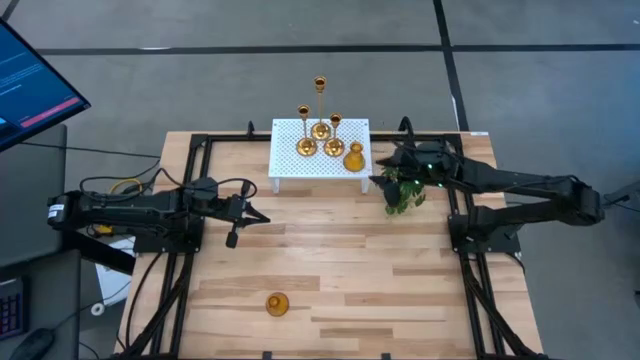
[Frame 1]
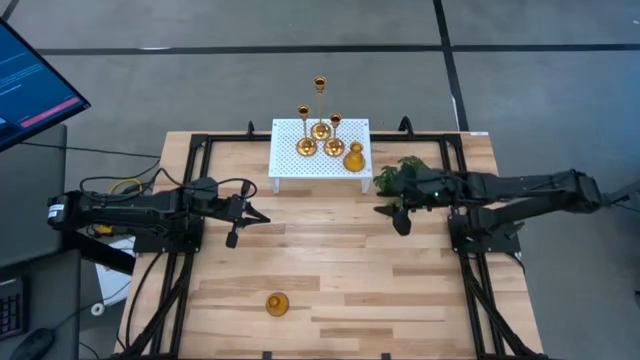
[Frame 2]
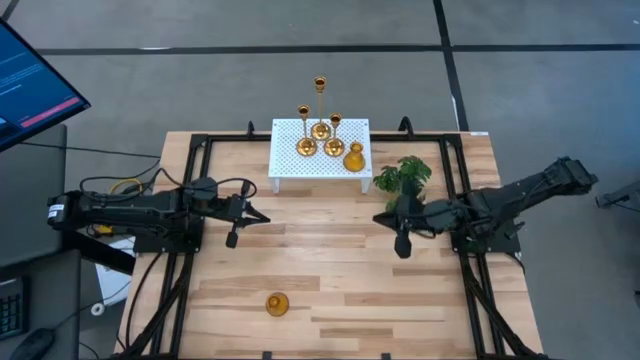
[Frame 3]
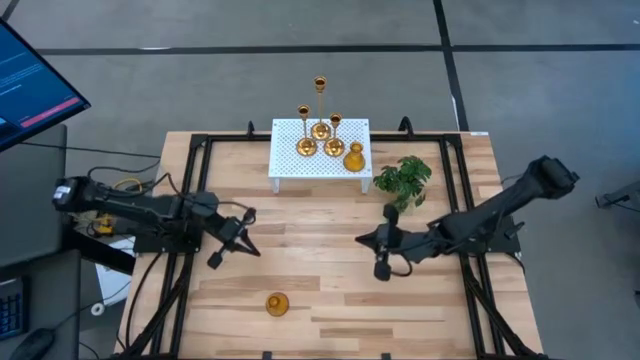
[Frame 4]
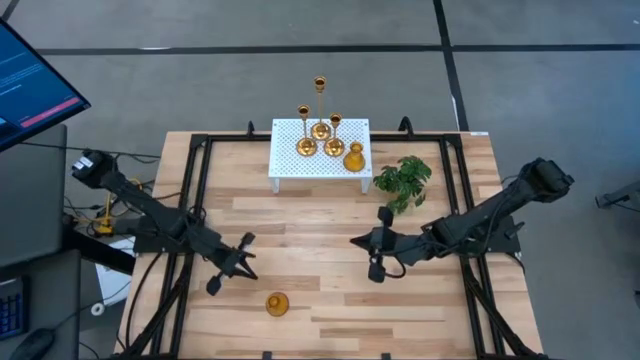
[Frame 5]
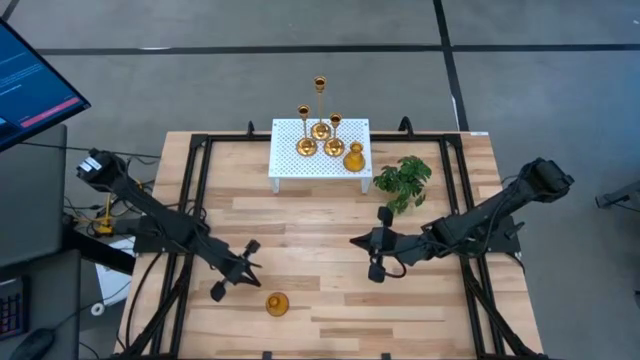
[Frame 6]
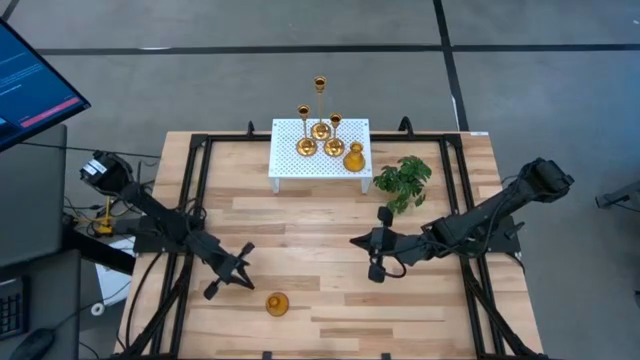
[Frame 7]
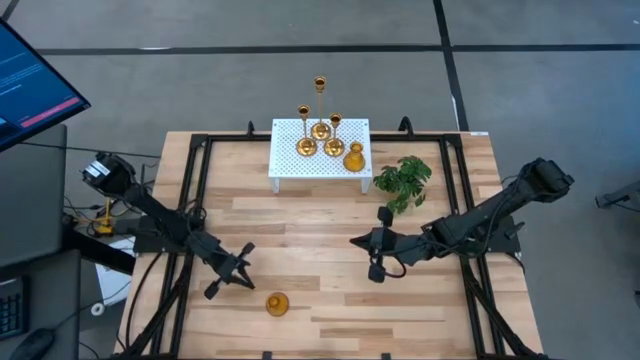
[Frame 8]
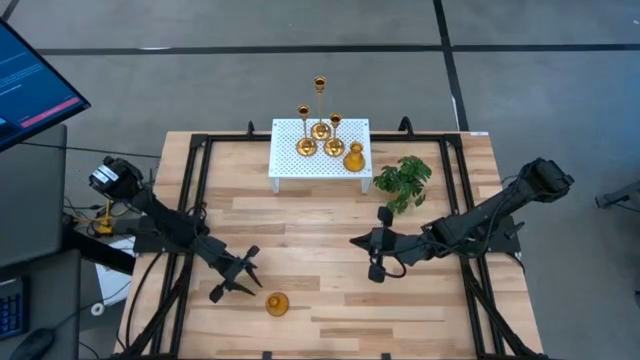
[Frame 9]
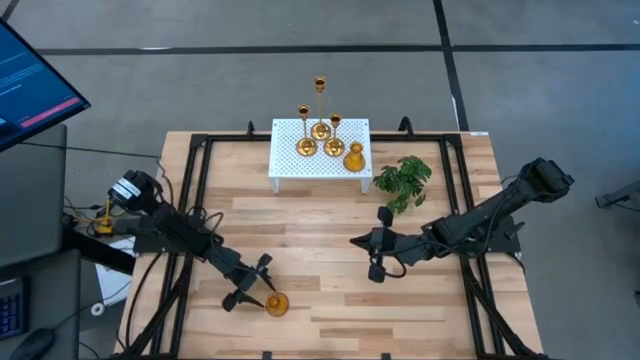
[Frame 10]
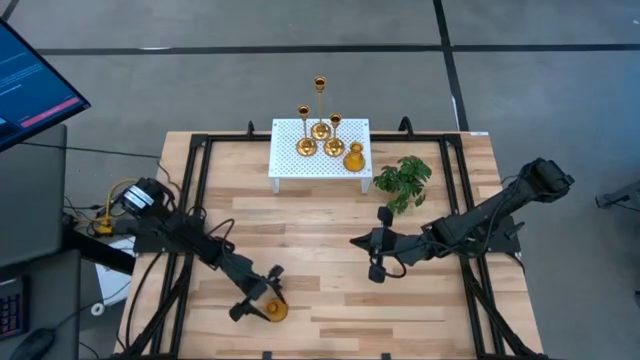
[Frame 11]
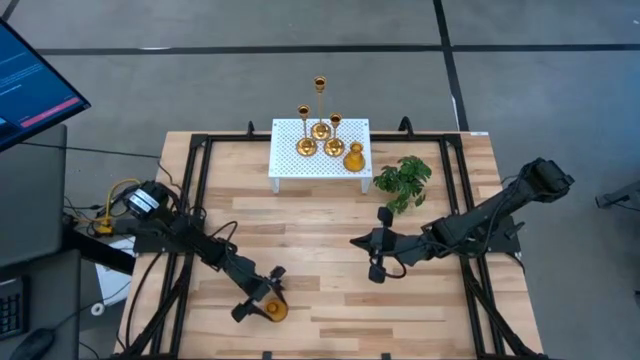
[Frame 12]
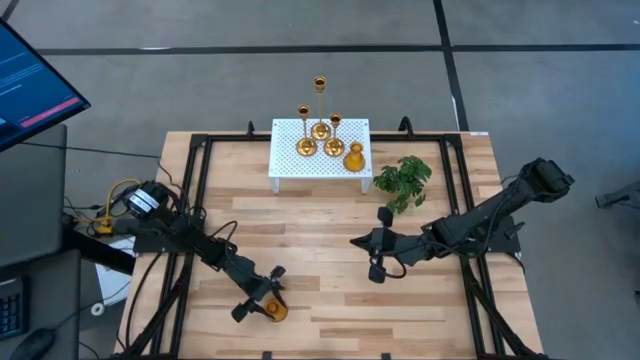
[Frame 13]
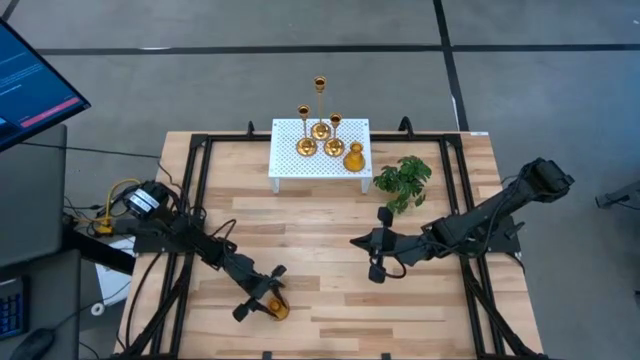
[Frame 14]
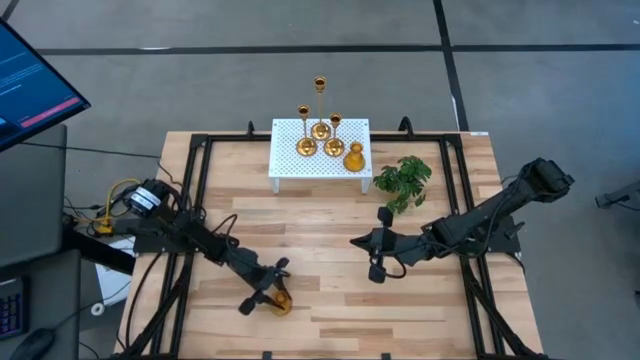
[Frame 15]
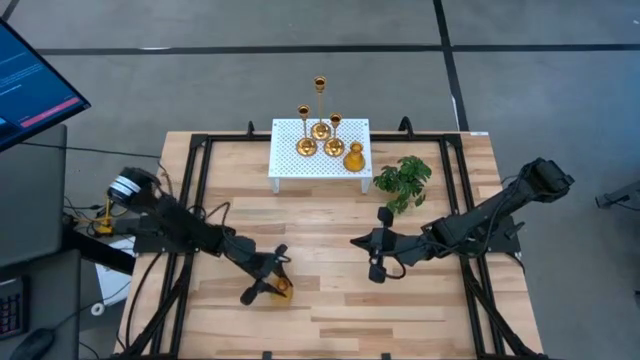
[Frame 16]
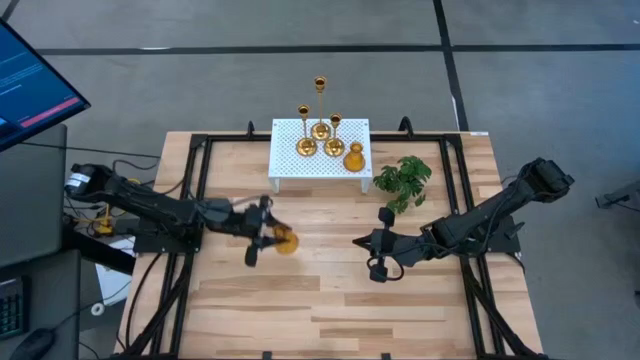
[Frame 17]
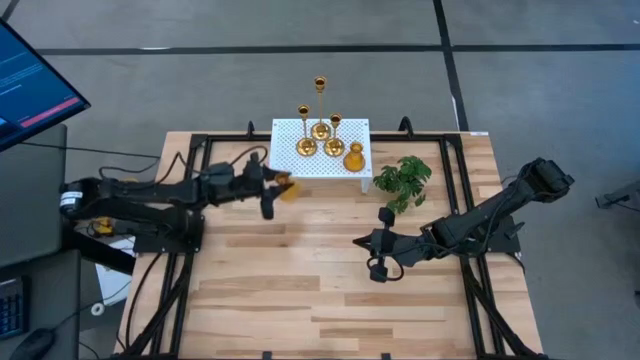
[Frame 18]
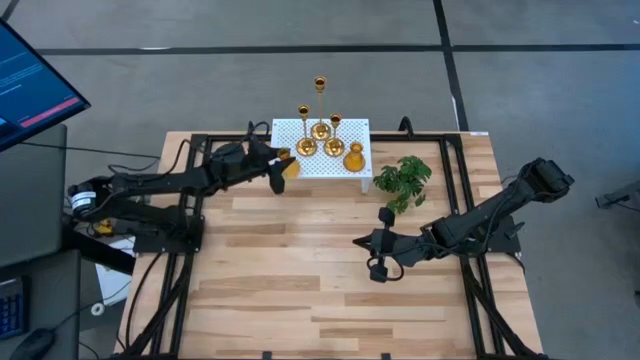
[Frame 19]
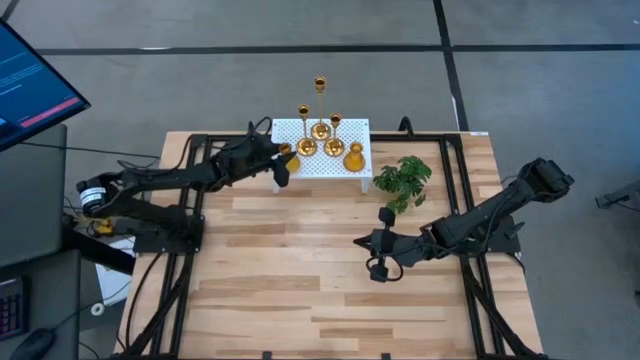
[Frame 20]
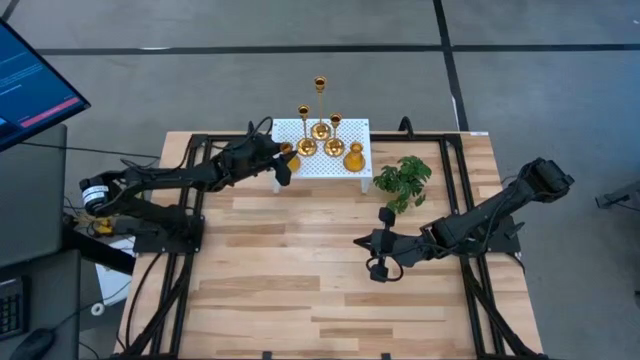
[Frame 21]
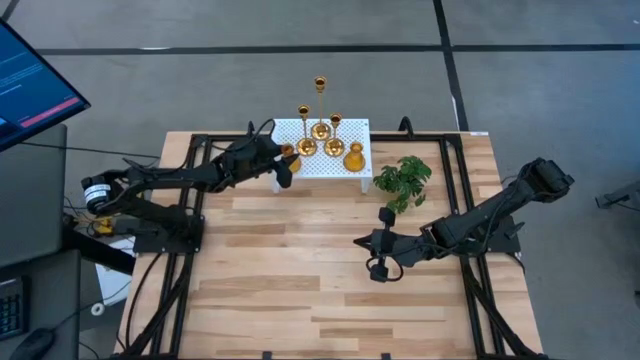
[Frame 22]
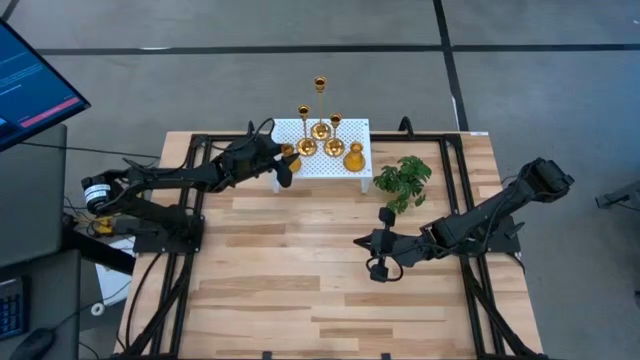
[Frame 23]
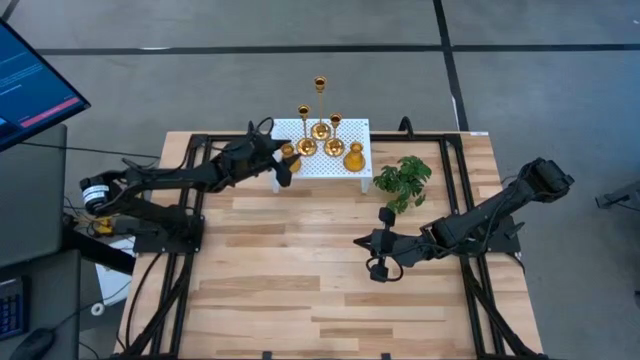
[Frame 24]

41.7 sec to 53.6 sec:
Task: Pick & Place candle stick holders
Put the yellow candle holder on the shelf

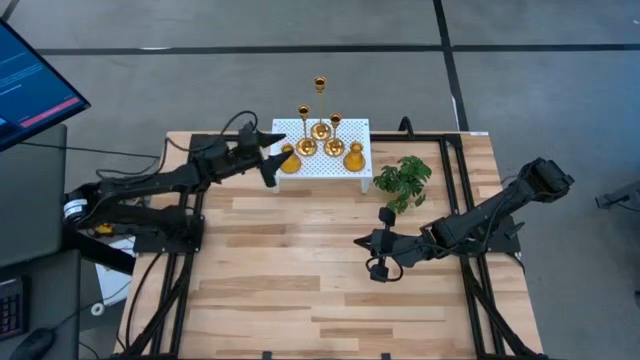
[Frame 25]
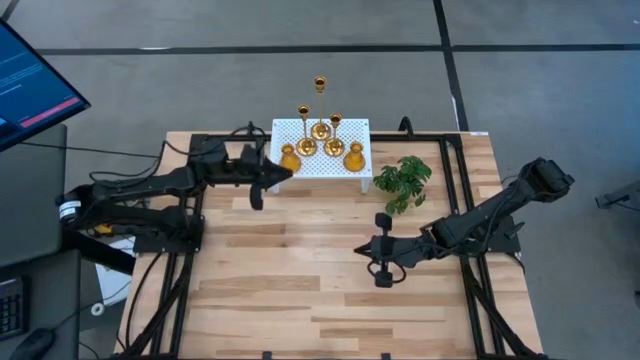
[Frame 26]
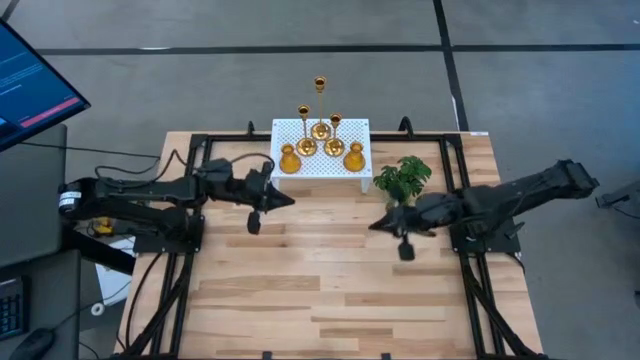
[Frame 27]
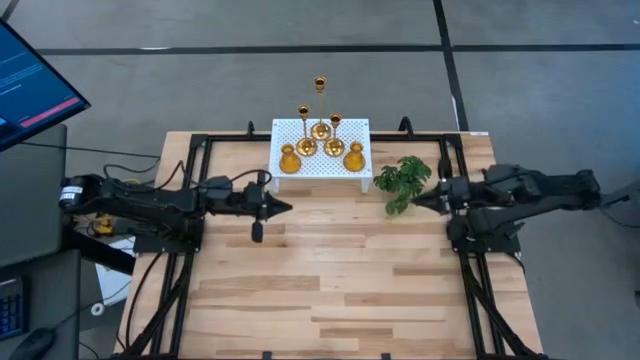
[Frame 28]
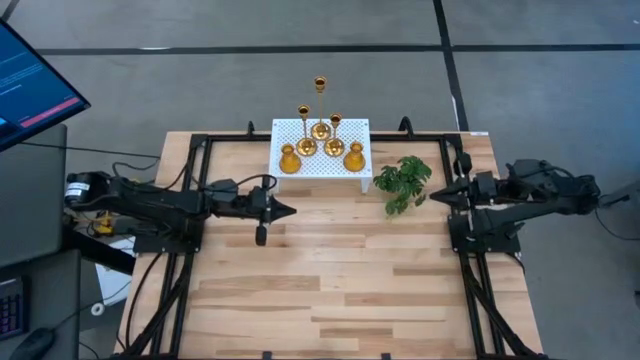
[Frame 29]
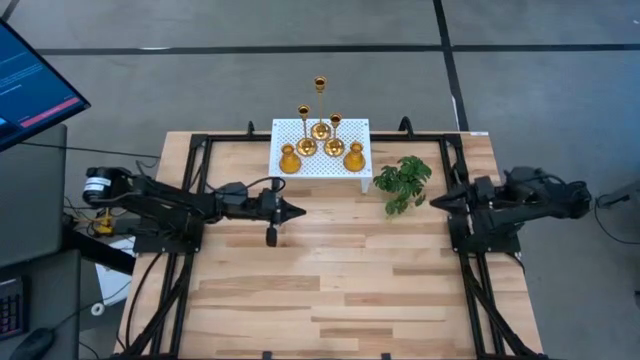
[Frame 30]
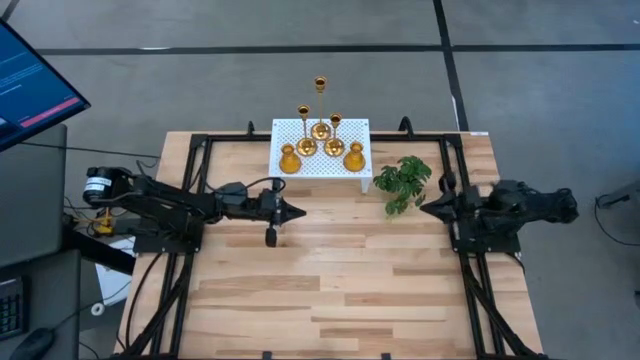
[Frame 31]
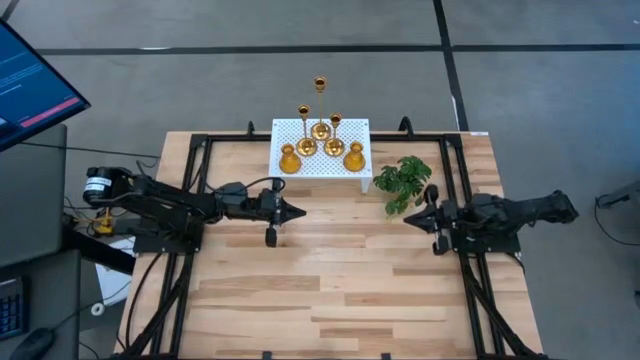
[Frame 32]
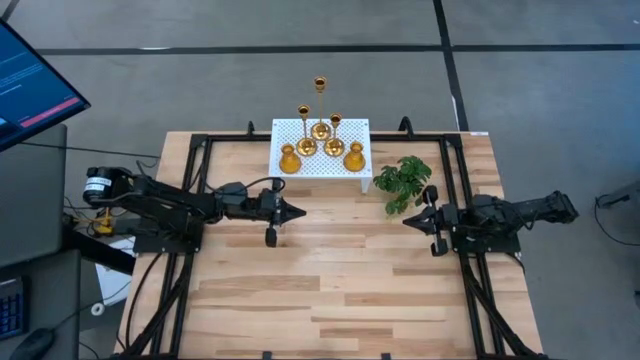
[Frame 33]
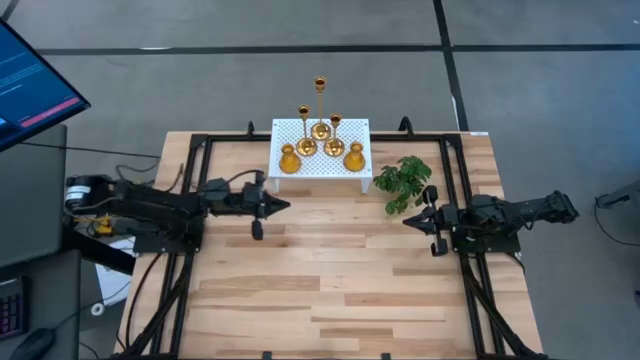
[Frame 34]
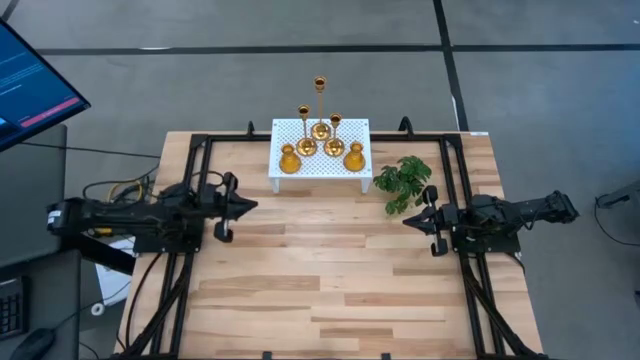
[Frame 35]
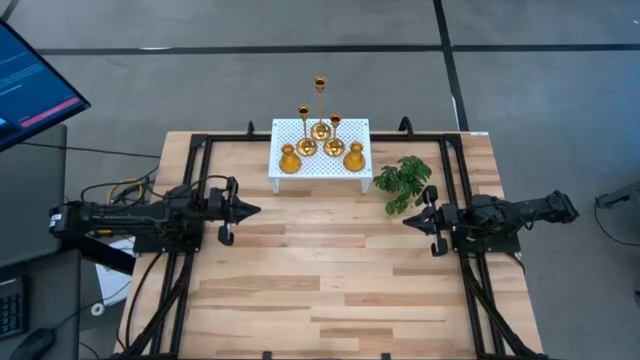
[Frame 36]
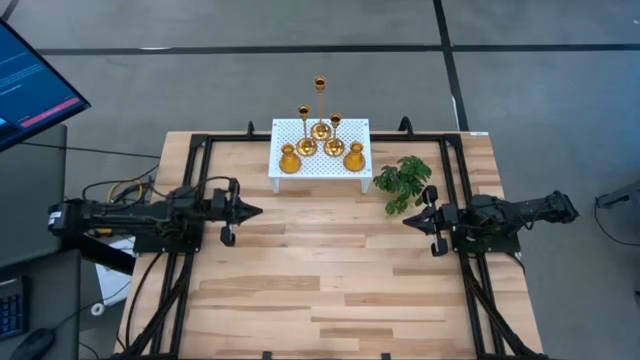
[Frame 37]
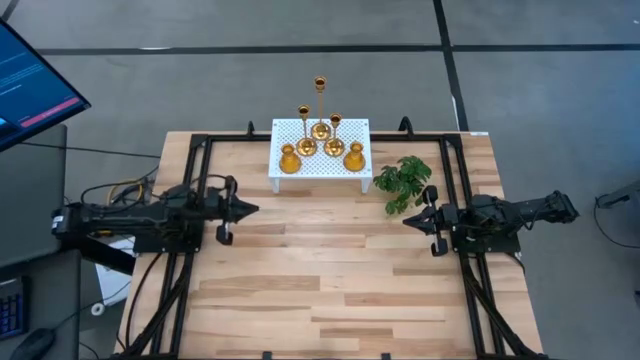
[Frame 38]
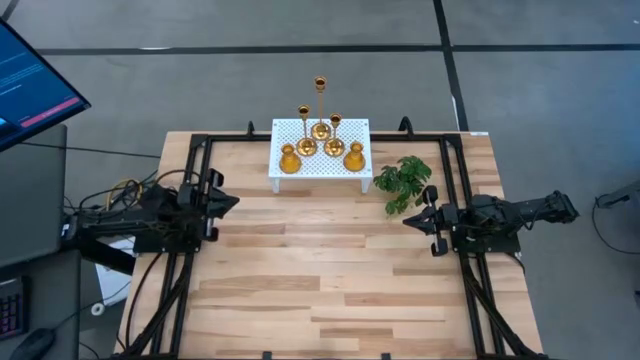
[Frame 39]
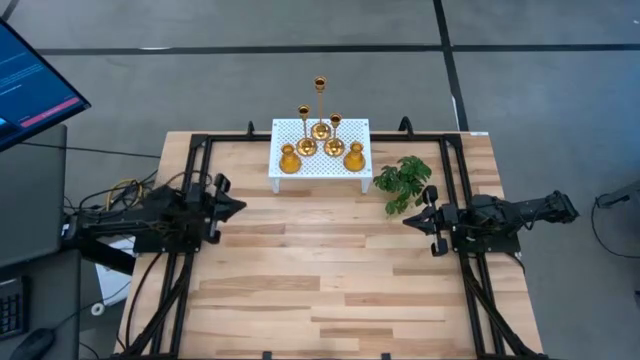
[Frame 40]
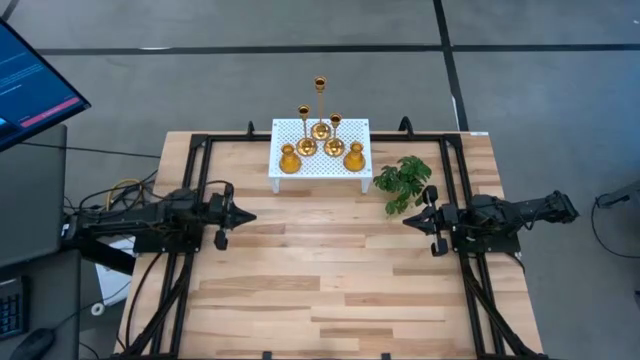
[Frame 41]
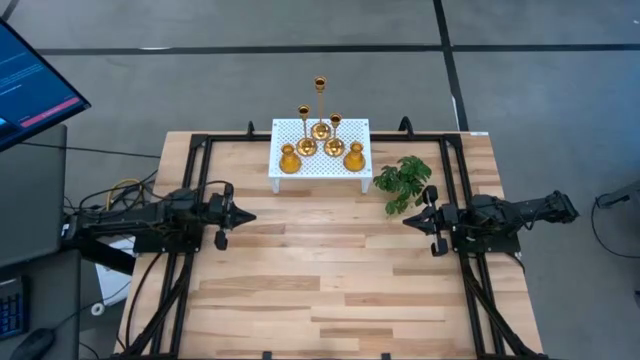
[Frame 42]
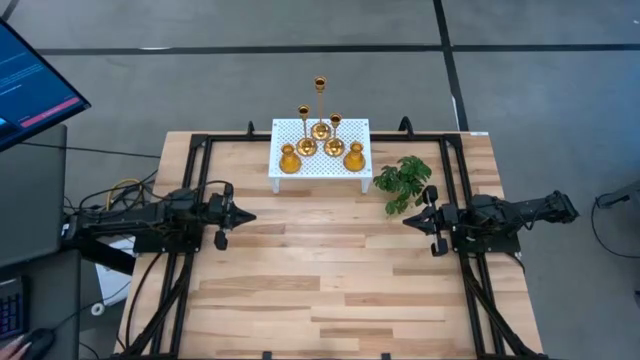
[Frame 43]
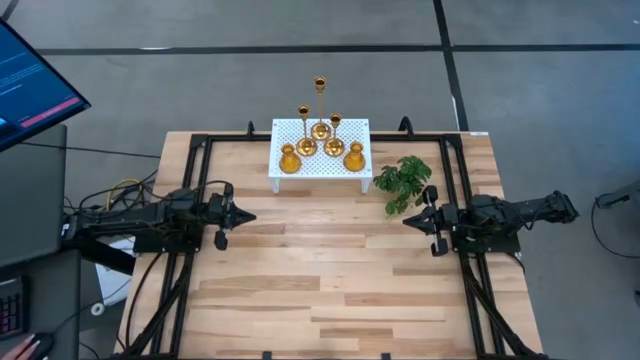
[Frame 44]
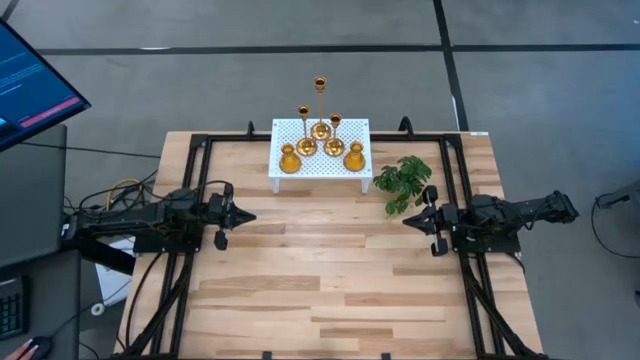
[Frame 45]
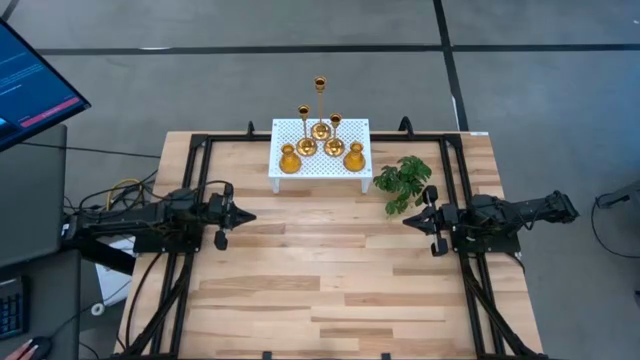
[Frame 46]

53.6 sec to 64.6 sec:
Return to home position
